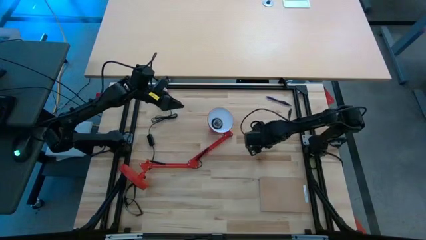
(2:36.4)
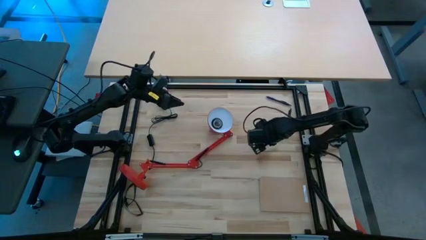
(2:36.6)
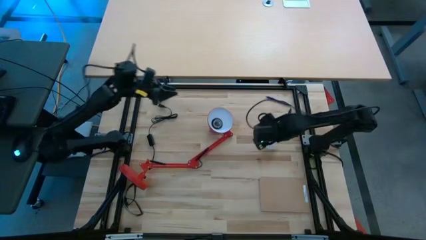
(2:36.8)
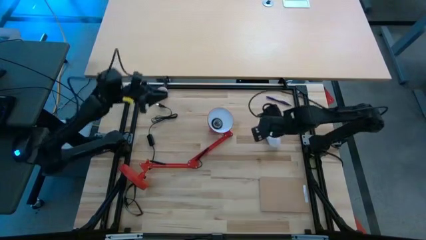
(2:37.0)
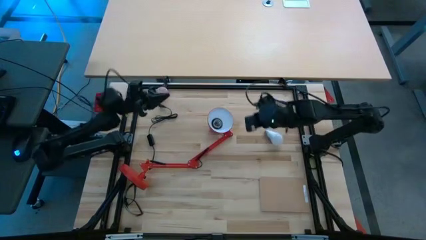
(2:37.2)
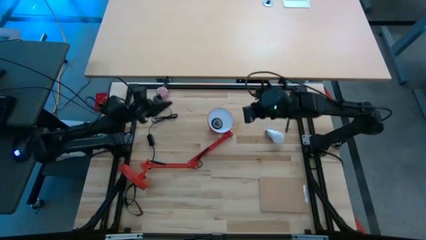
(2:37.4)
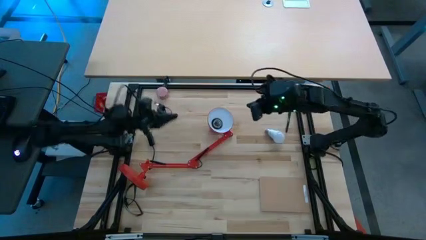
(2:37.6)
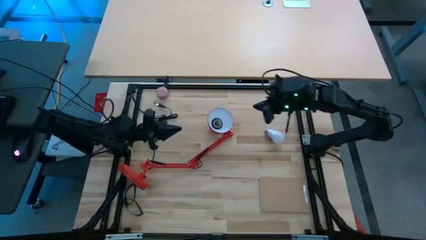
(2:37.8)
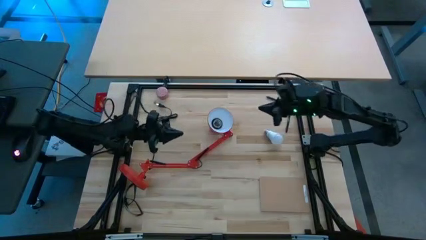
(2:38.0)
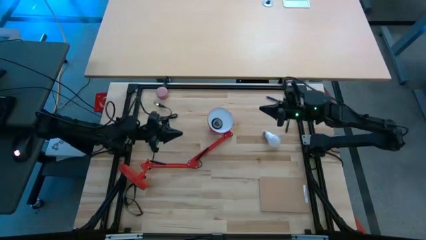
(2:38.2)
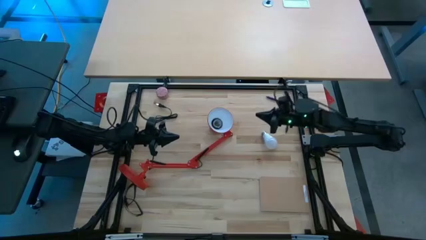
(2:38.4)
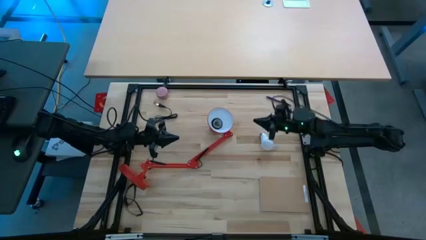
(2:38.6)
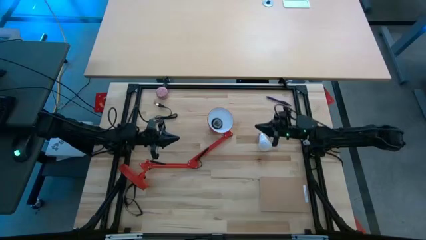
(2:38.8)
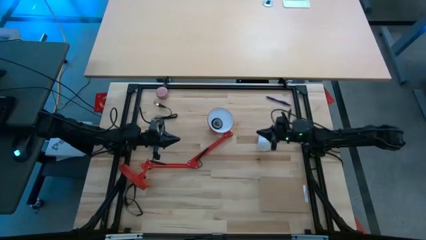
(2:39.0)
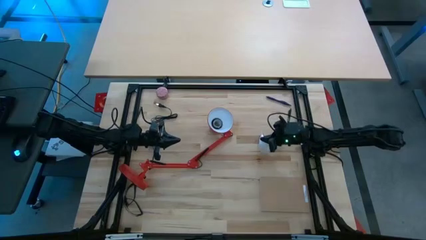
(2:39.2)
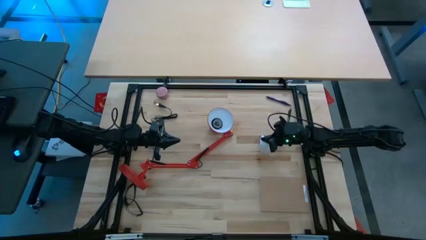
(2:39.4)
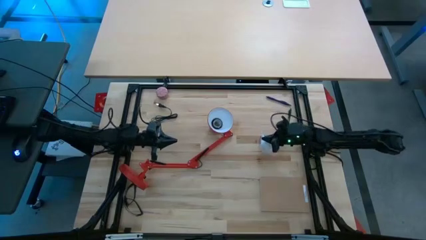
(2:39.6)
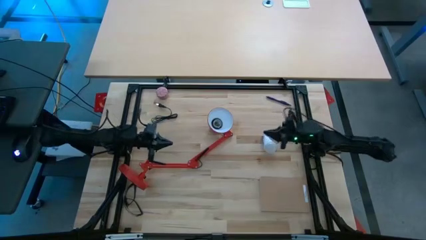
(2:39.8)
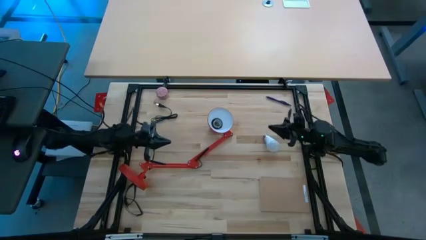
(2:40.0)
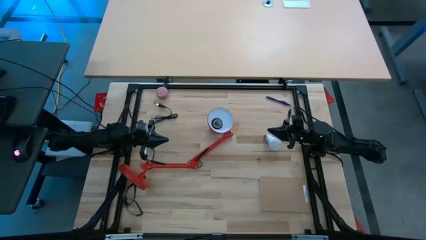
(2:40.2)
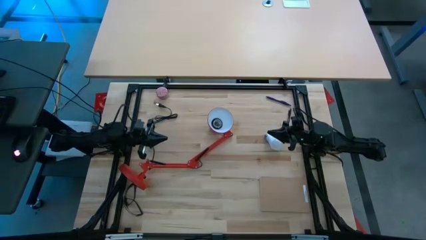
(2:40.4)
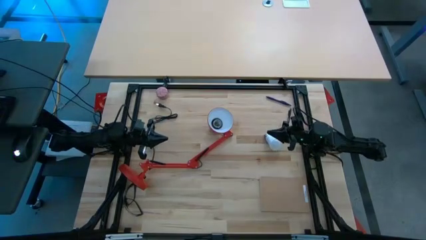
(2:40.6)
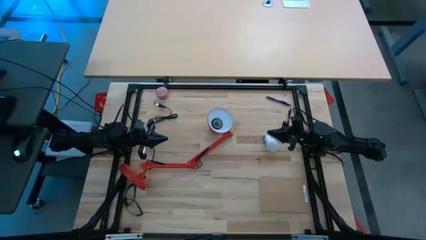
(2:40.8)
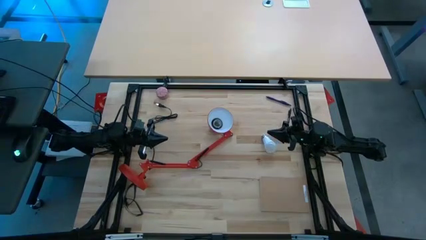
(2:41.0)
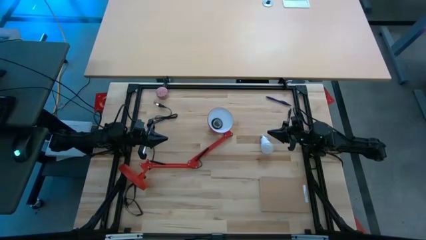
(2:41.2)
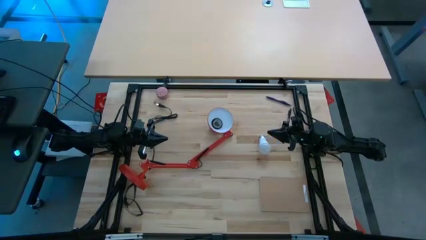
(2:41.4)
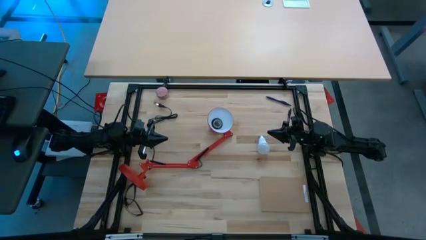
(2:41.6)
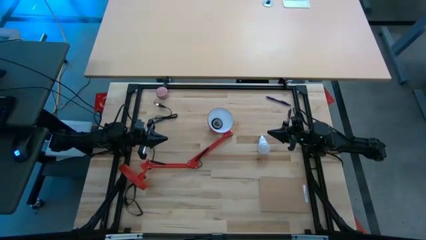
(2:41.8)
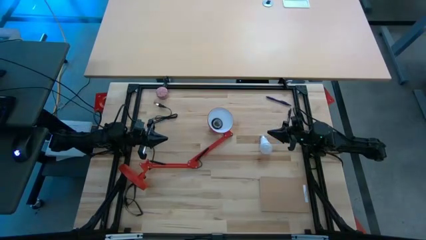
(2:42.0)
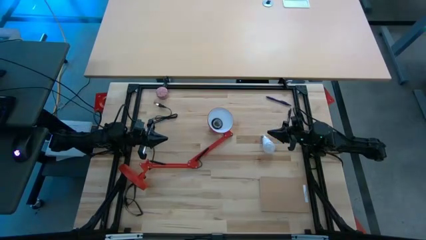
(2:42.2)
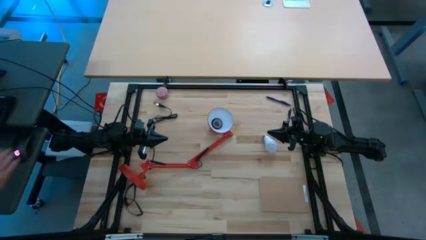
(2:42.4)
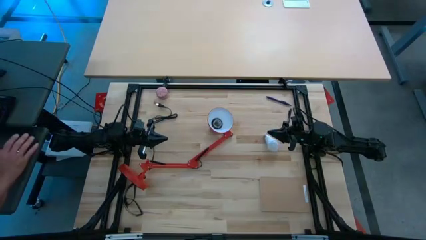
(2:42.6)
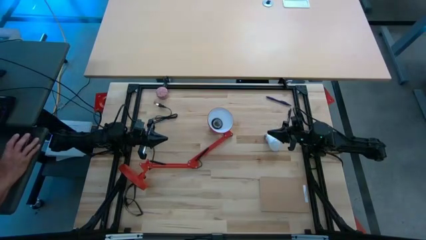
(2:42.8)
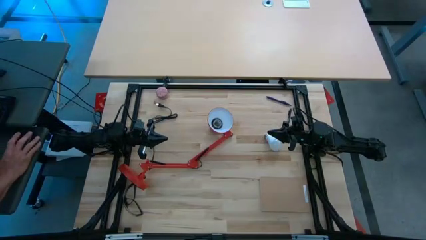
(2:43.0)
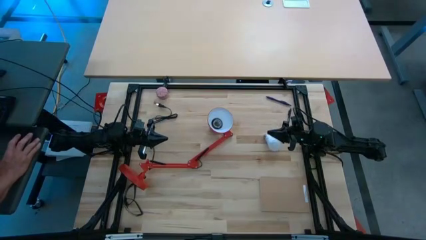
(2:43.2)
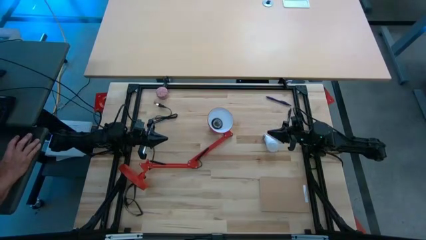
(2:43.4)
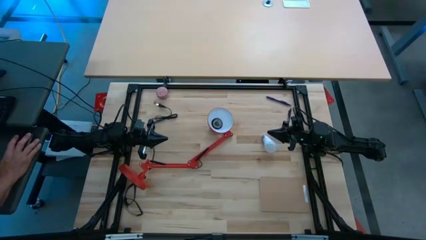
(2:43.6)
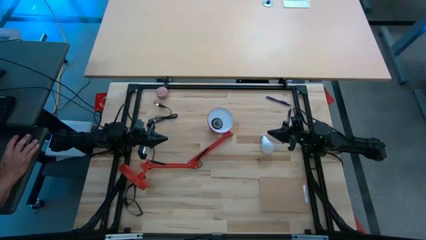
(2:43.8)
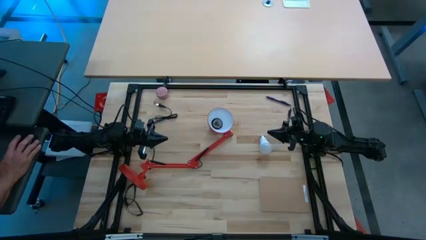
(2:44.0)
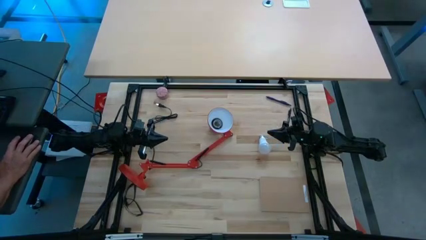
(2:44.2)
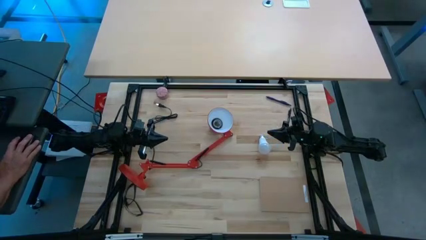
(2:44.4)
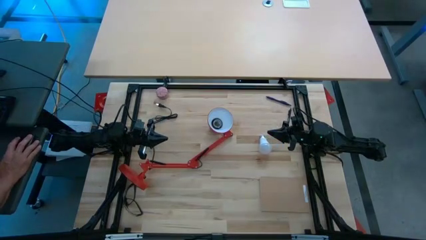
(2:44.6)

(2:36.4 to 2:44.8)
Task: Screw lightbulb
Return to Home Position

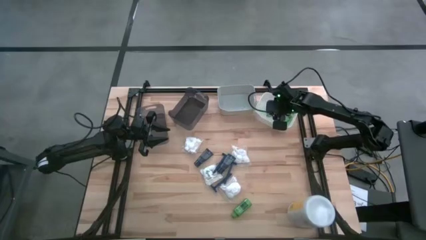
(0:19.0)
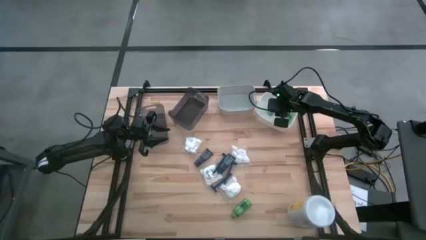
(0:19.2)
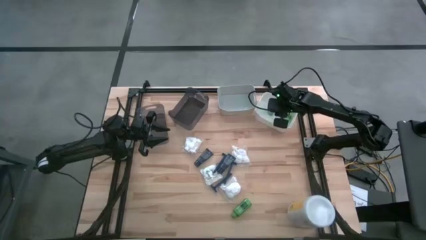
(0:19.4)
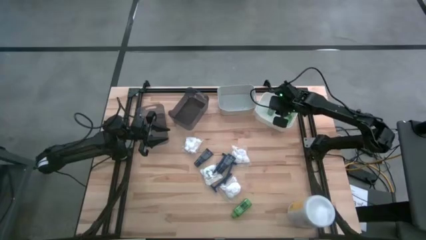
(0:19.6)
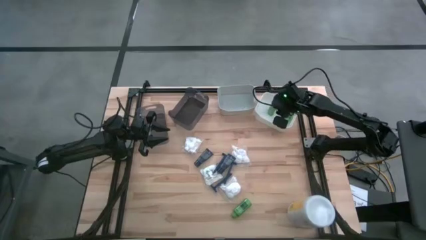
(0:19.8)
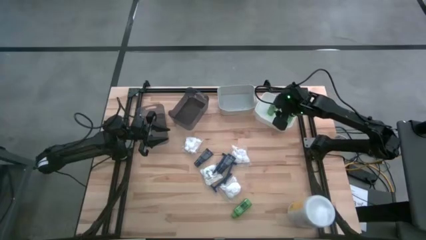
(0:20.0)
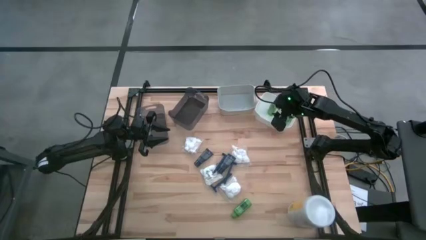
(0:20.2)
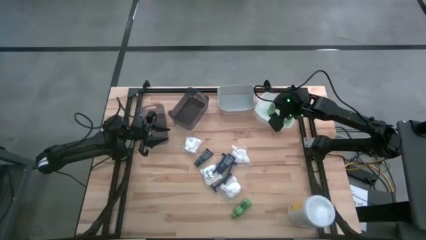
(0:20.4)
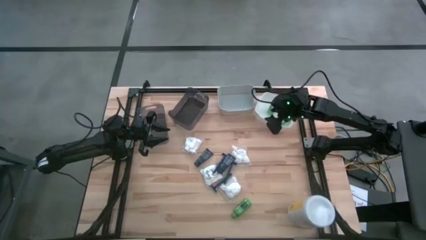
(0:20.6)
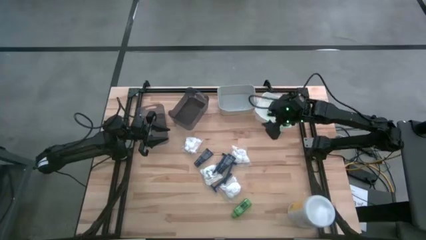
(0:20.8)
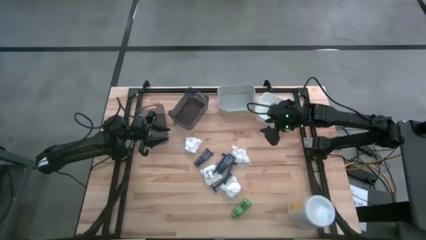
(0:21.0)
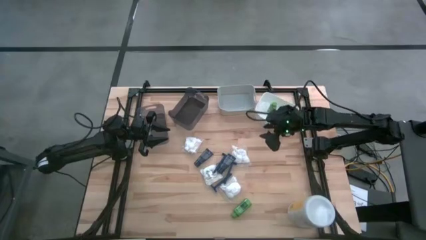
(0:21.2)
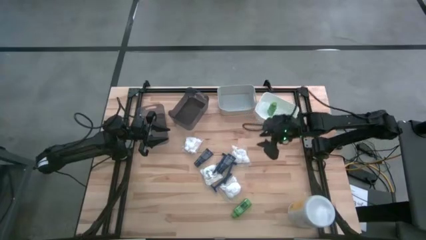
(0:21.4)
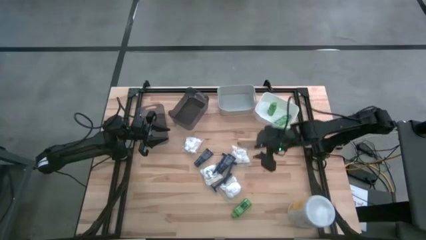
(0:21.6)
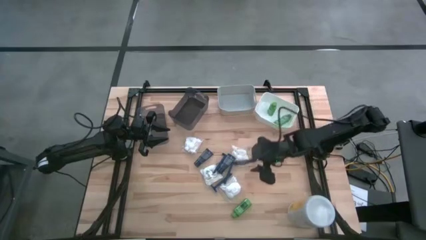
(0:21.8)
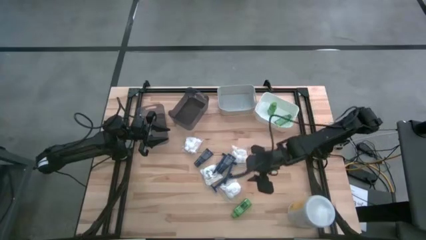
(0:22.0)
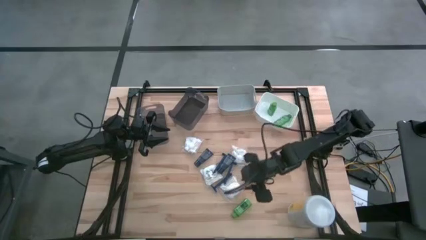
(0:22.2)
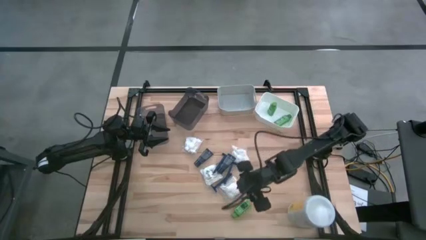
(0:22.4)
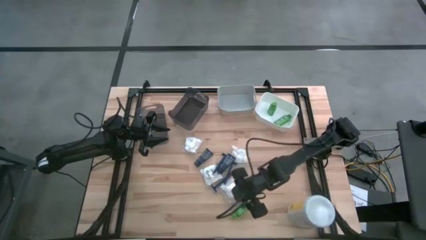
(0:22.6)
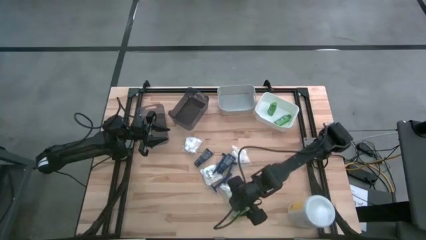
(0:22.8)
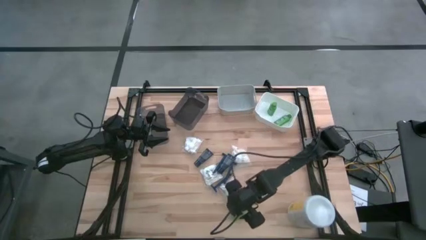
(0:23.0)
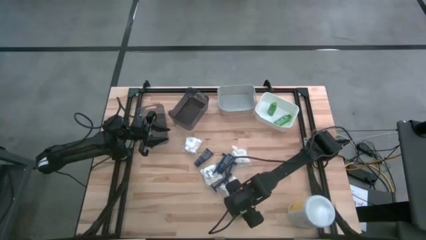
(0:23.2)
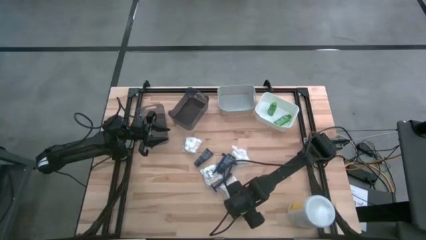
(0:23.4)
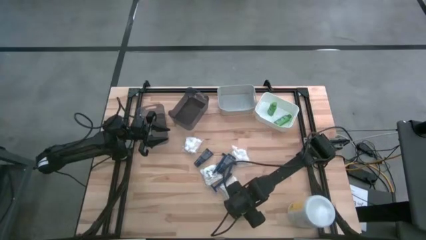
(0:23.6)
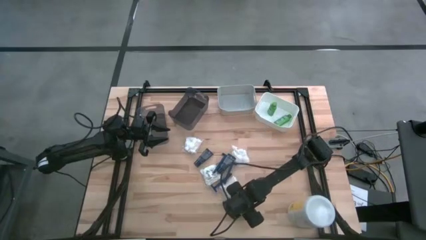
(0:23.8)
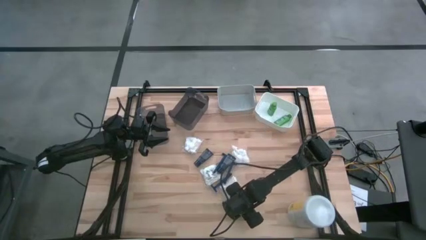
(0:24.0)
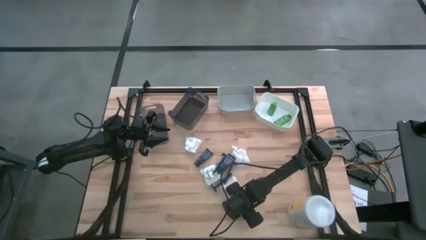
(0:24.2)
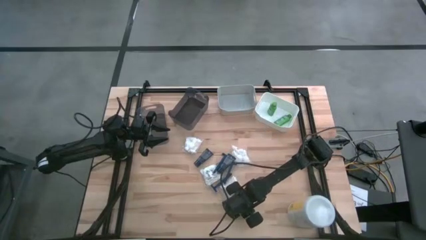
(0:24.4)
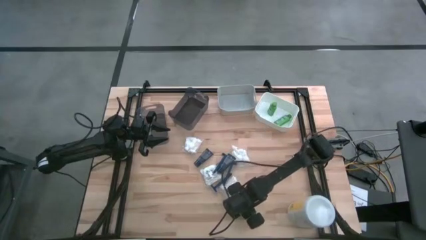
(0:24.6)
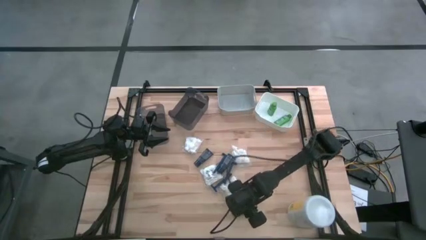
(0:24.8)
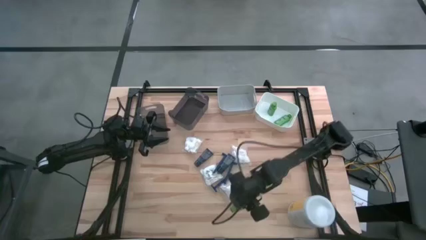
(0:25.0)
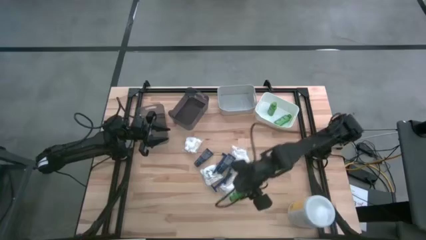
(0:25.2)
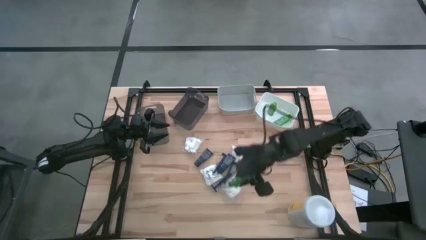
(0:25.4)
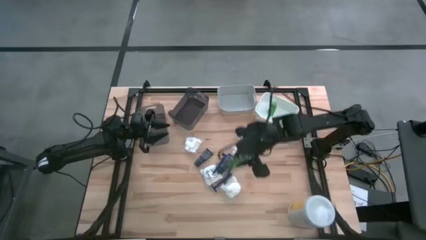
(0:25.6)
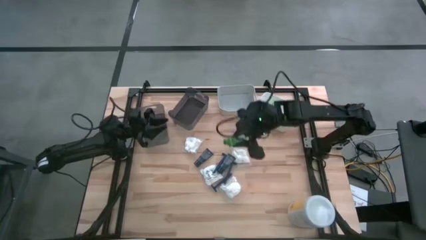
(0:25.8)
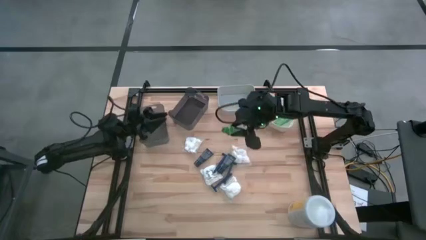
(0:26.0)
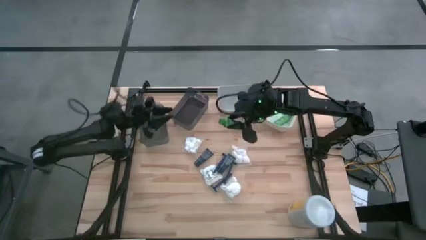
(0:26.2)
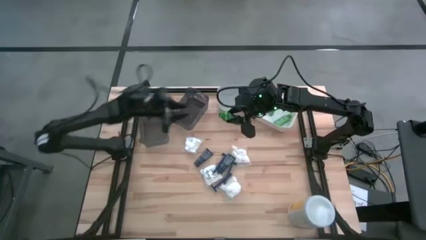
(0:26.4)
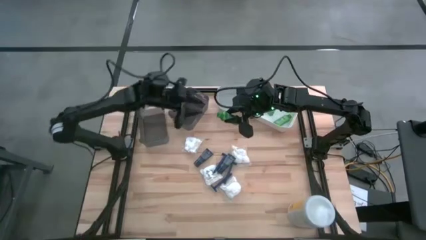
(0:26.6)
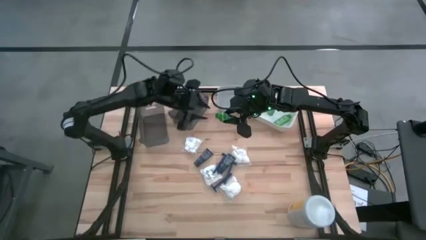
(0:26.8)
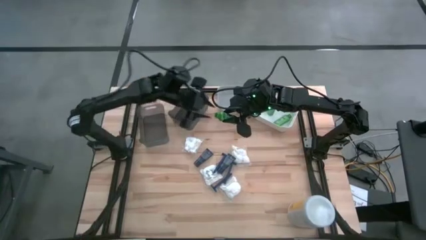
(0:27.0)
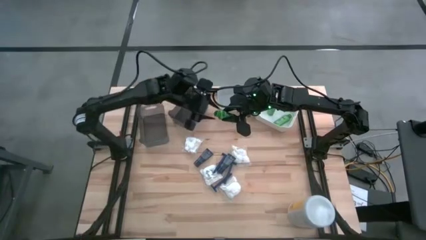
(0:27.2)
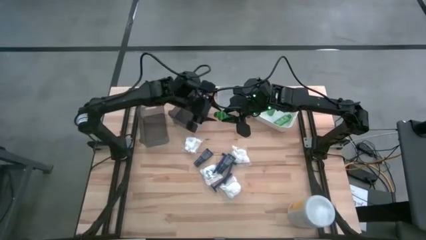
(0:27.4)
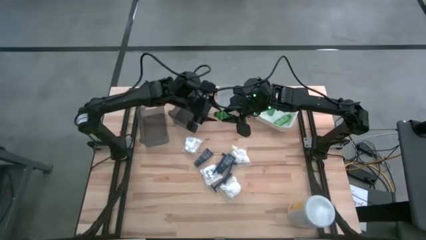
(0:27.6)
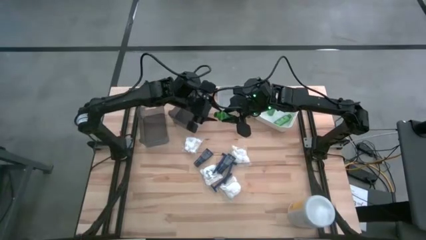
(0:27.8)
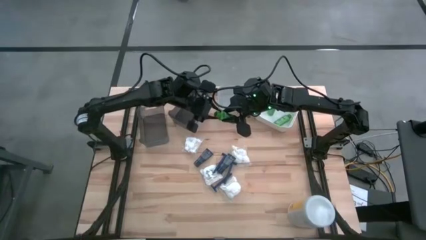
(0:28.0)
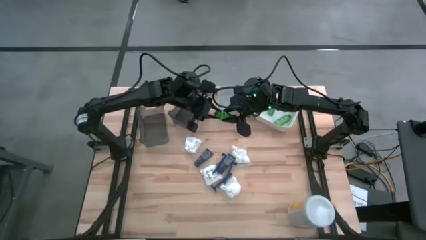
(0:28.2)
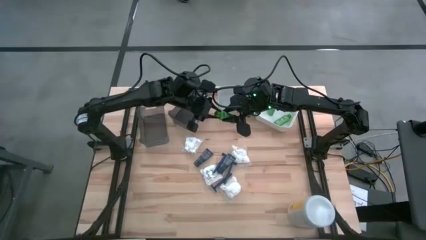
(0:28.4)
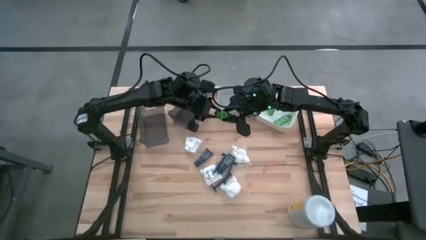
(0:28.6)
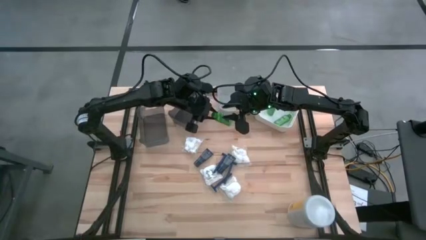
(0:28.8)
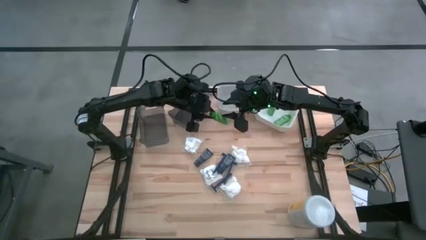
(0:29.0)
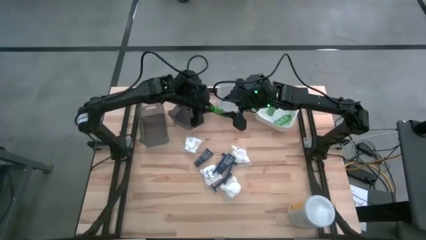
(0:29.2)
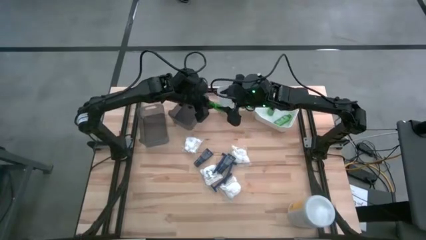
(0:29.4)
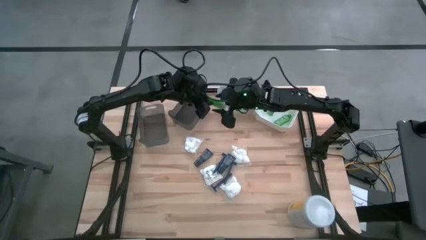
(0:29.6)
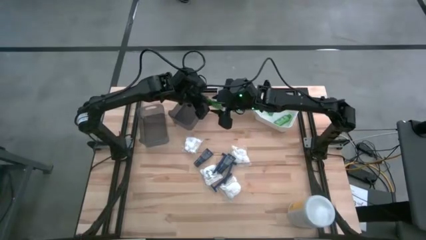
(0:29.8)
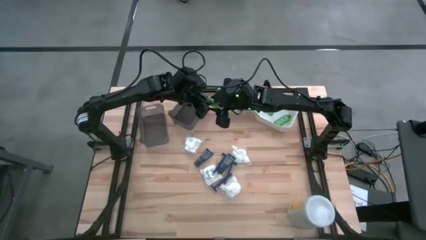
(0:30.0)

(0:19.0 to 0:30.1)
Task: Pick & Place Travel size toiletries
Put the green shampoo into the white bin
